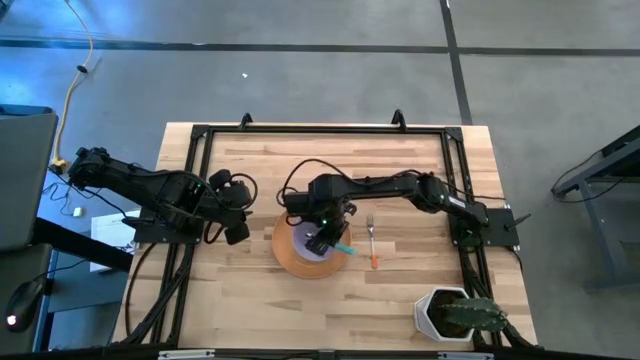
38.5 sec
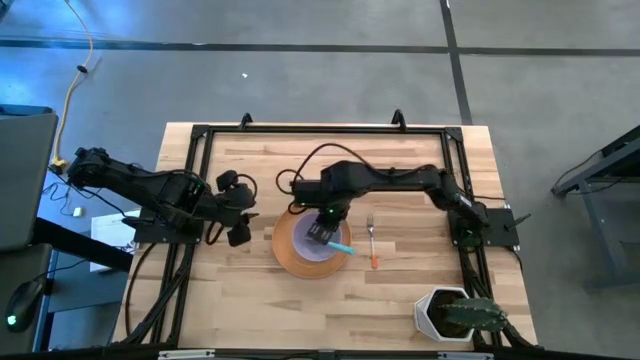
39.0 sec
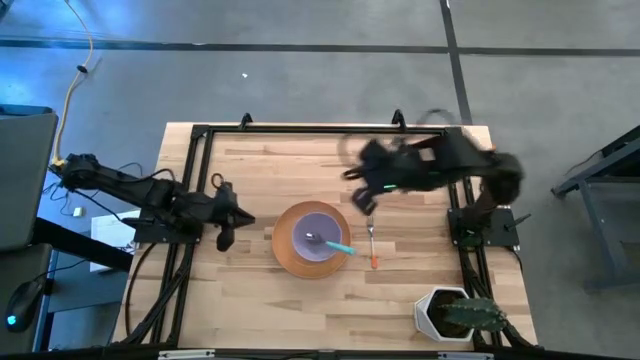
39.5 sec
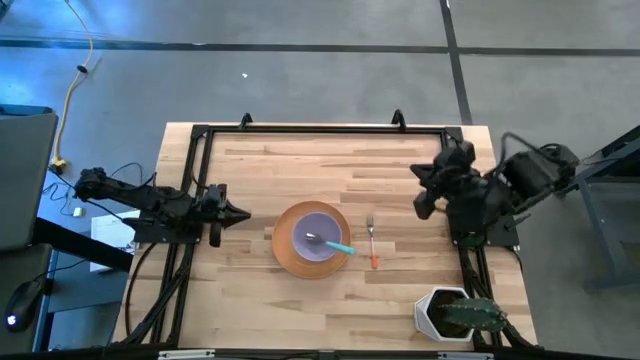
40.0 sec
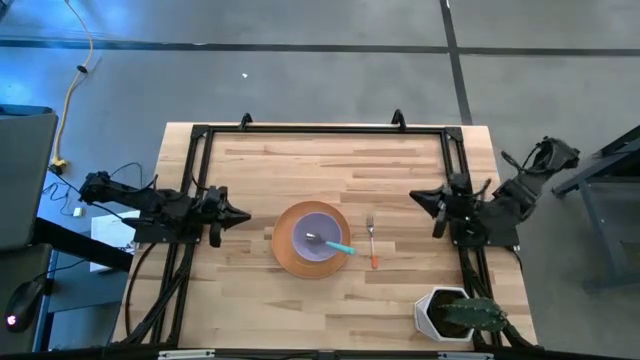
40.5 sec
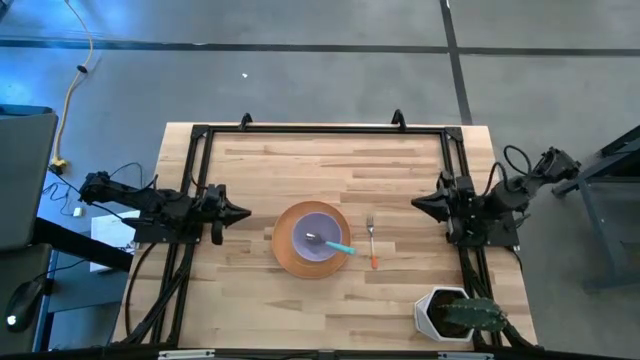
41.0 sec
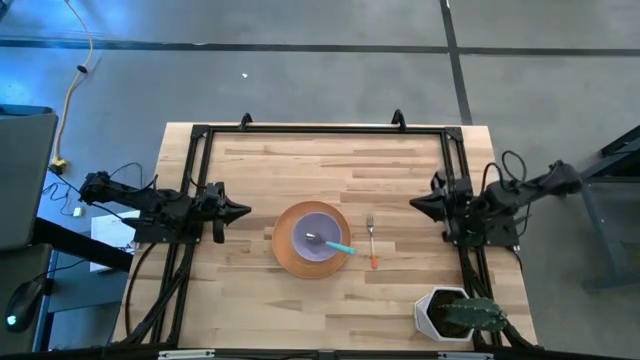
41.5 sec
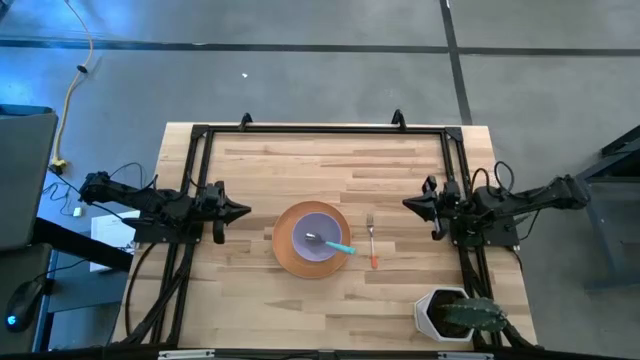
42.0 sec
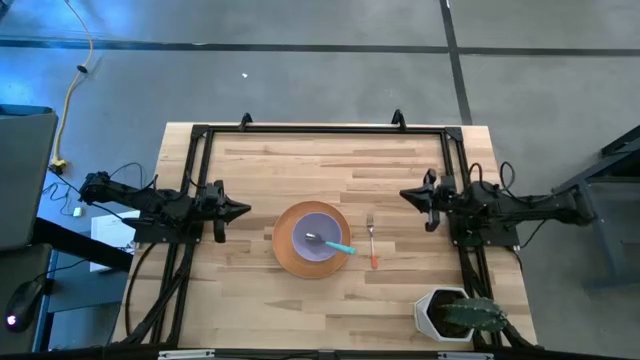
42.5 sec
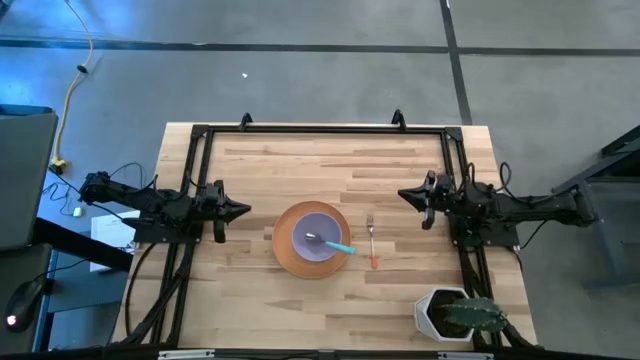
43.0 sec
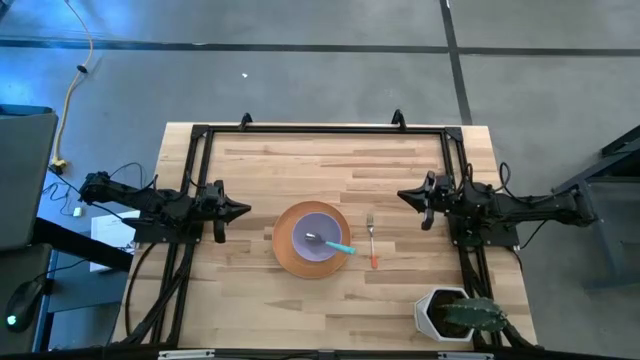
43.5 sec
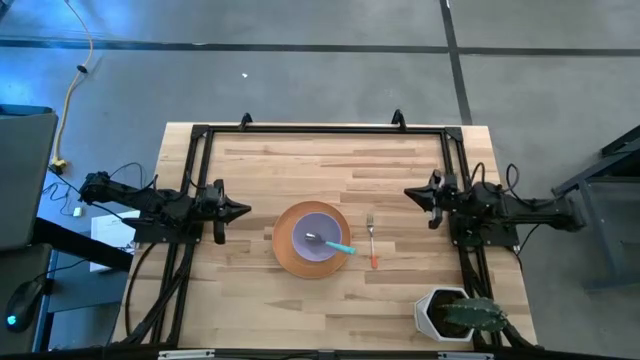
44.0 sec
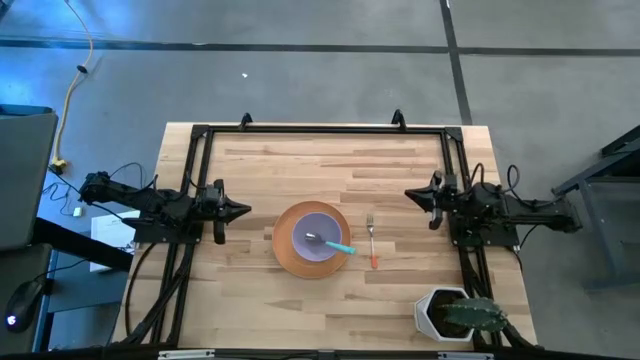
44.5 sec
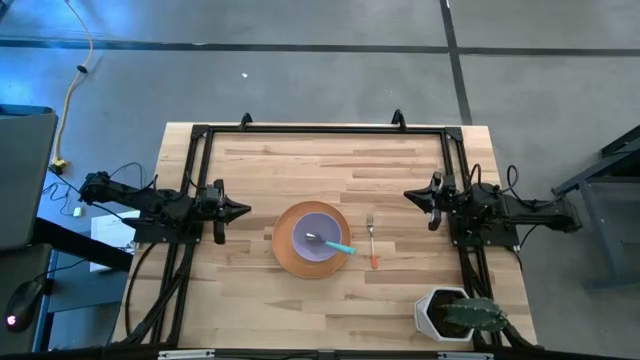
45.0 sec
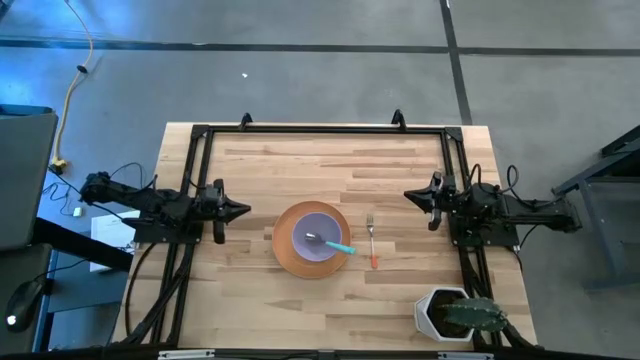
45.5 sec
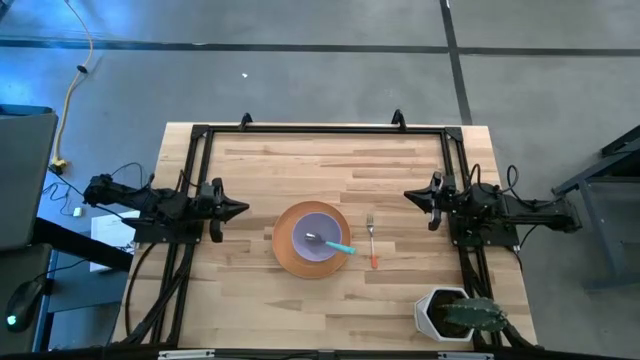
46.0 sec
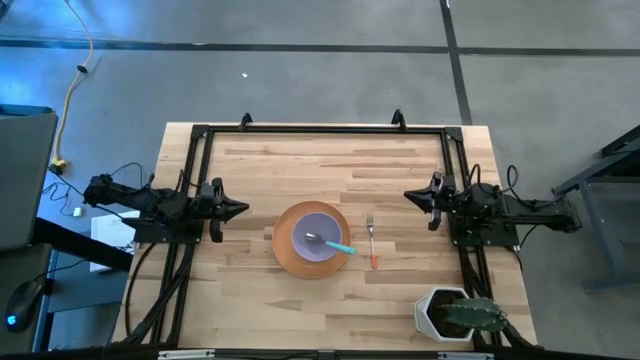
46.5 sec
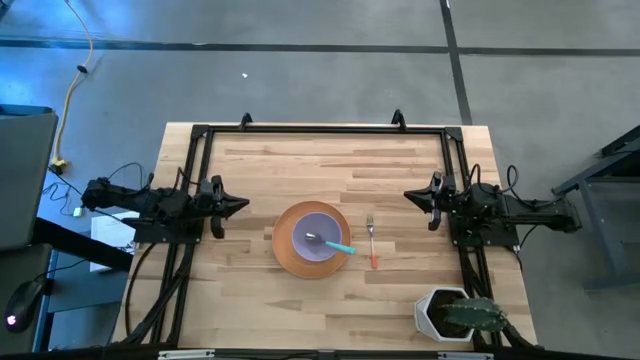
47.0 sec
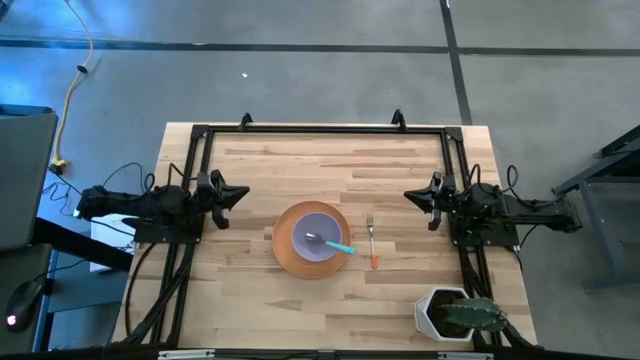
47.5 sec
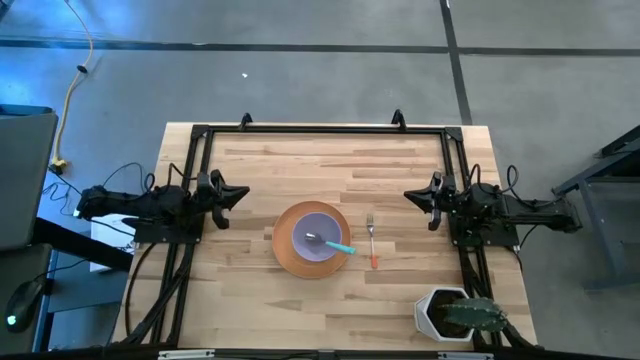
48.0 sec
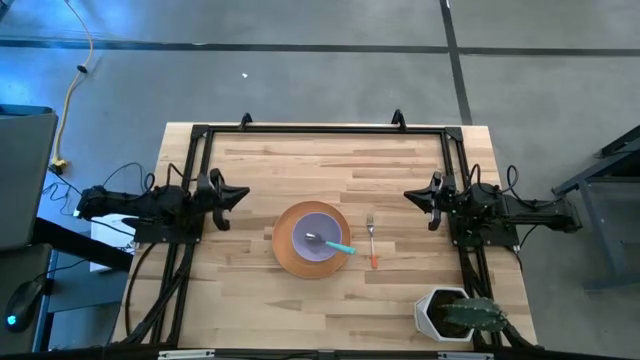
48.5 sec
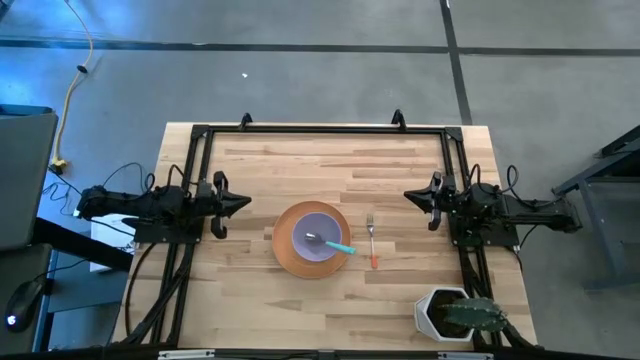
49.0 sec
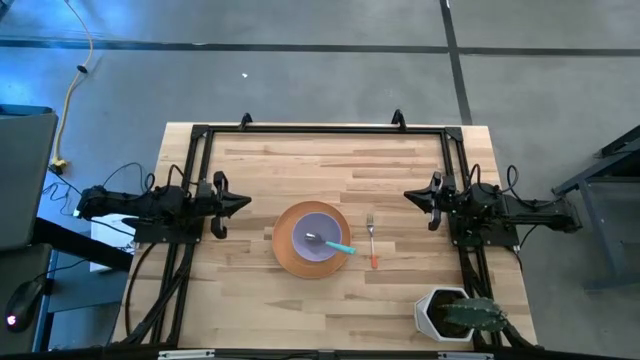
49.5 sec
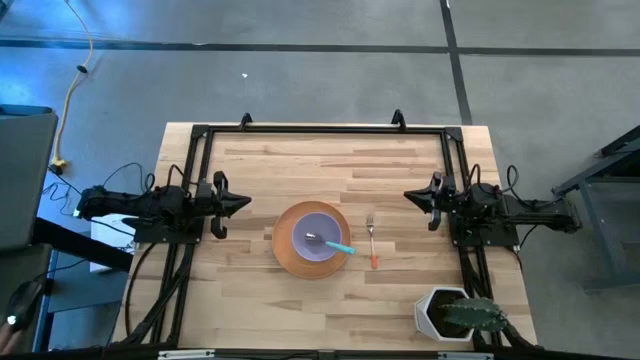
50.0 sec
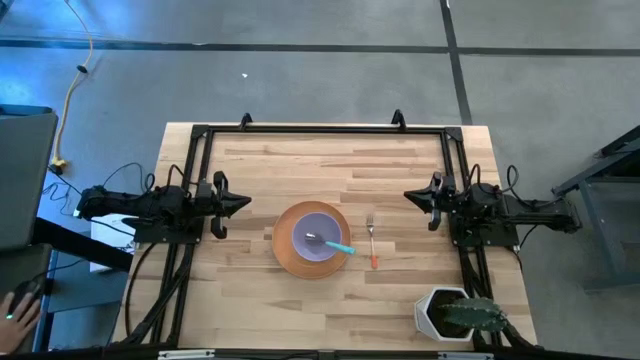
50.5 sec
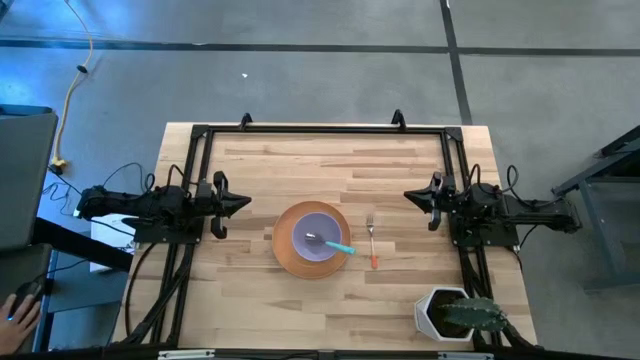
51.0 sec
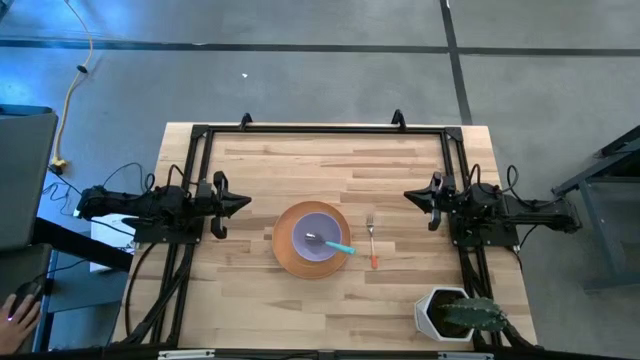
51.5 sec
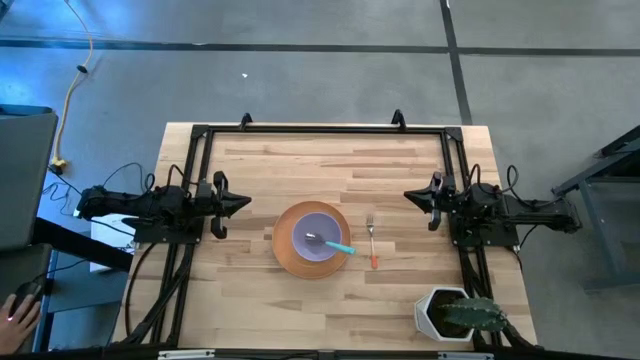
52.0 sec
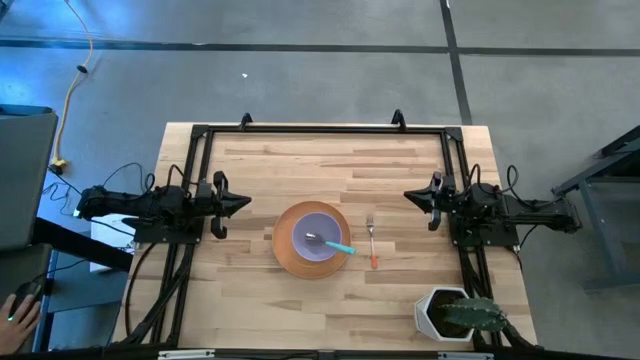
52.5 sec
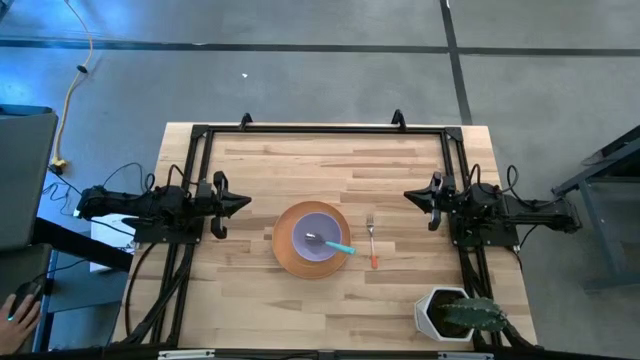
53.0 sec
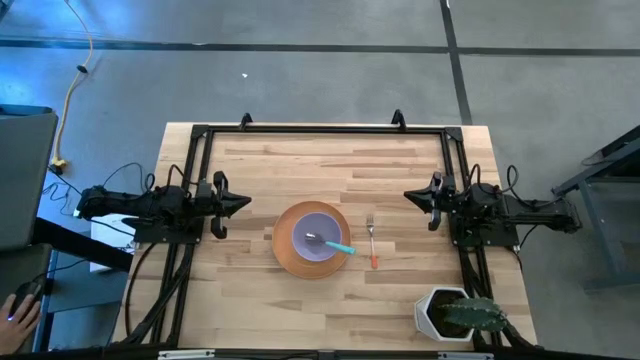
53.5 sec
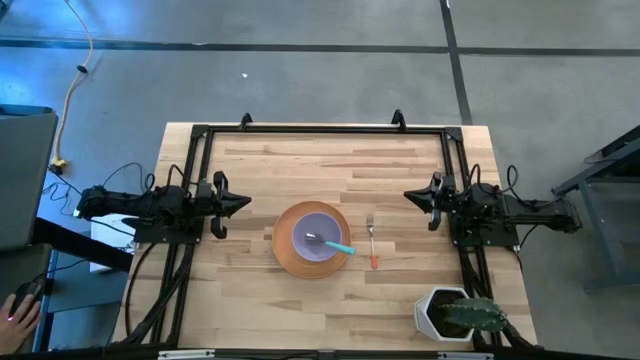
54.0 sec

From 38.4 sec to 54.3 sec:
Task: Set table place
Return to Home Position

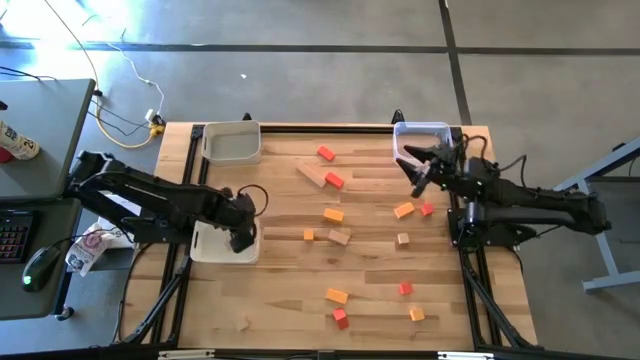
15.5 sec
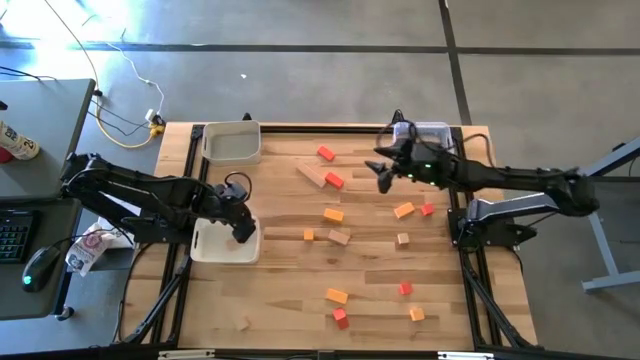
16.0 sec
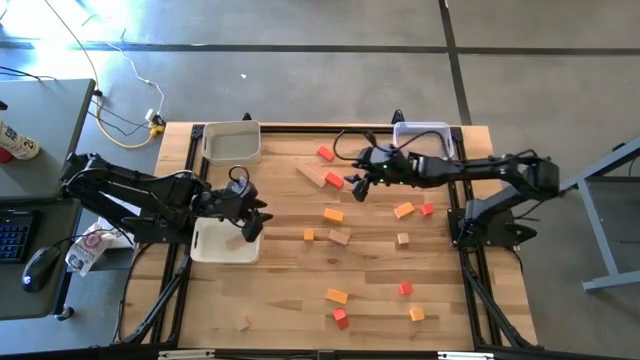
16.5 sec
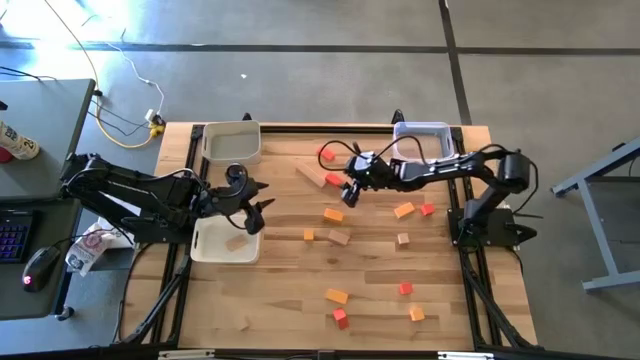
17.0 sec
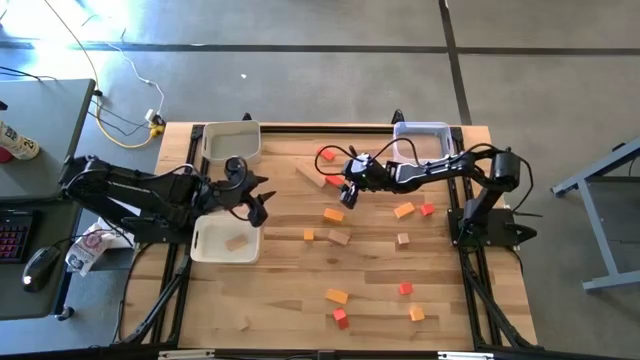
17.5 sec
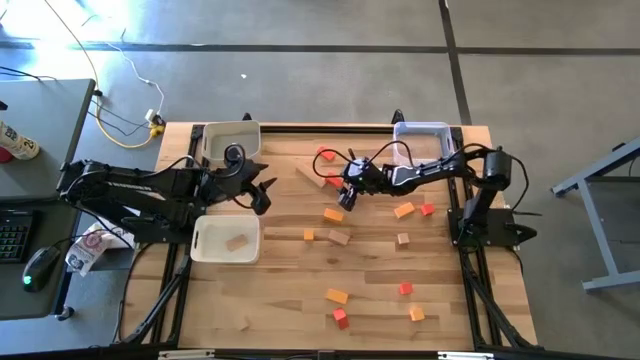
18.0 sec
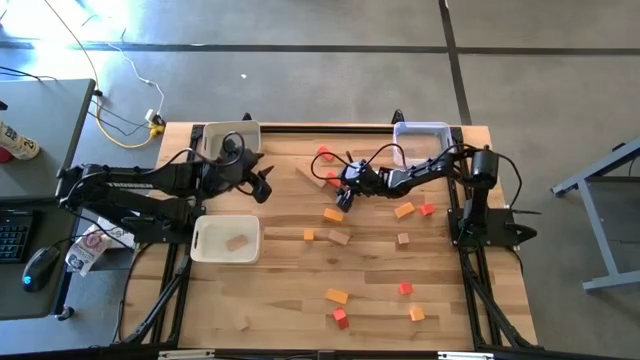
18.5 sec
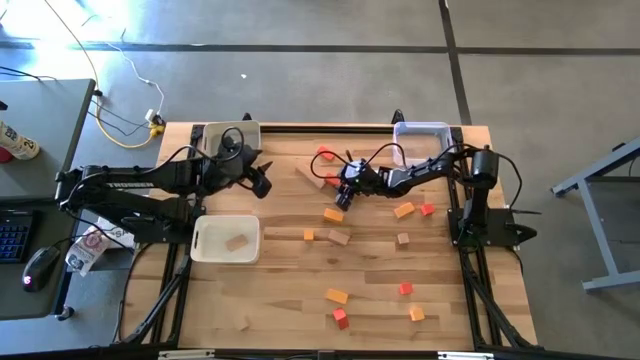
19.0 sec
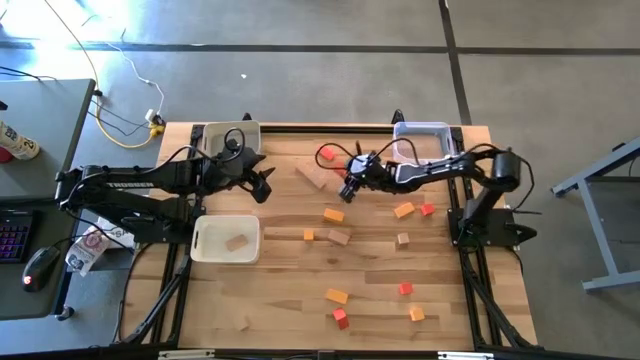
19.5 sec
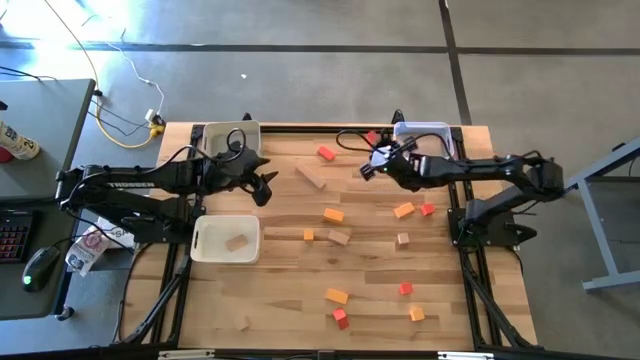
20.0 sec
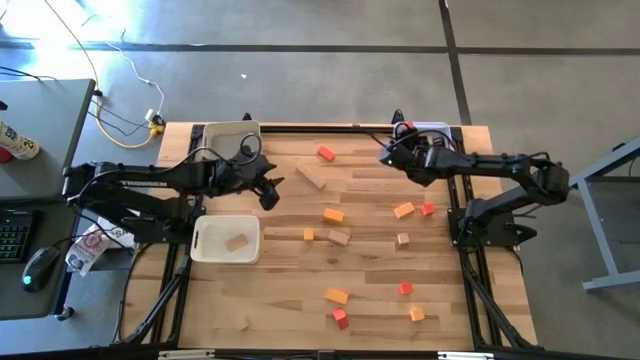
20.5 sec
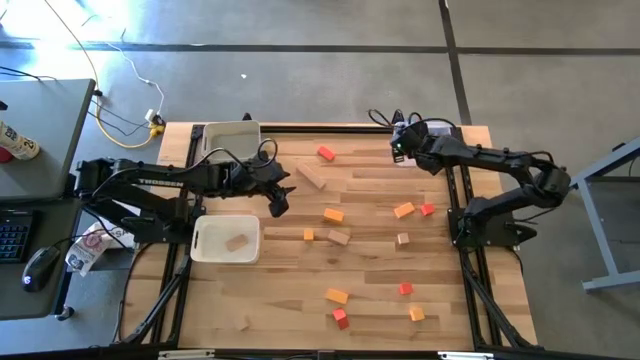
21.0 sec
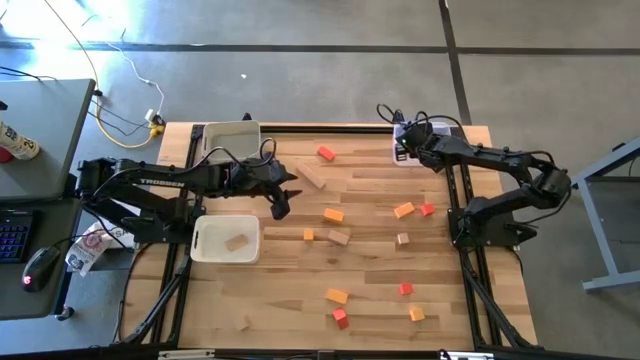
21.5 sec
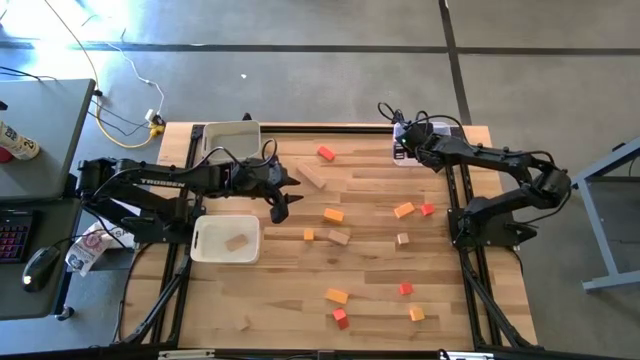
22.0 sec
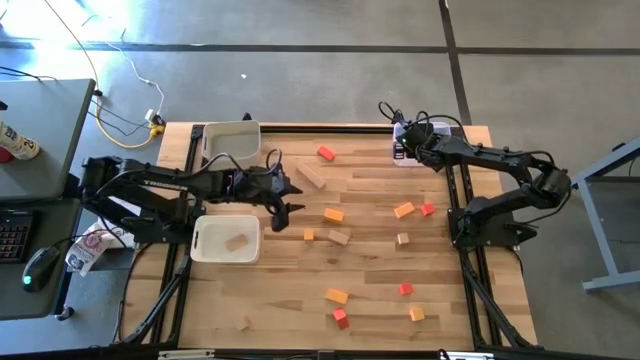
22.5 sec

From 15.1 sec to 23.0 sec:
Task: Sort & place blocks by color
Put the orange block into the transparent bin
